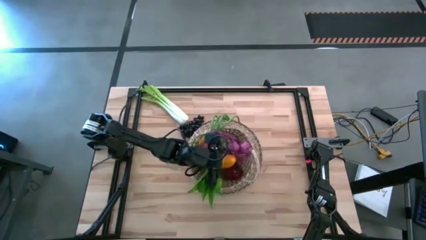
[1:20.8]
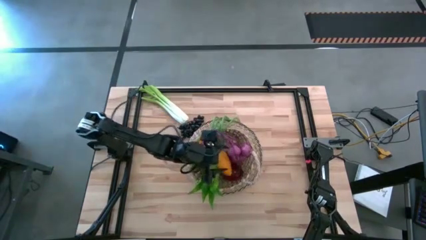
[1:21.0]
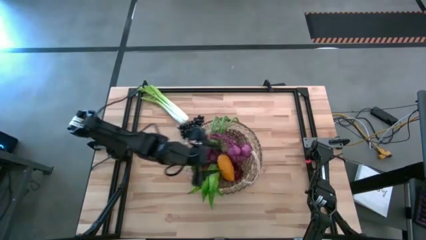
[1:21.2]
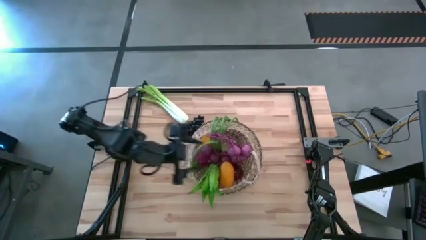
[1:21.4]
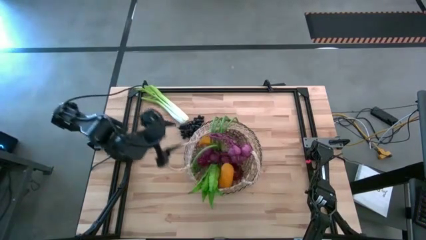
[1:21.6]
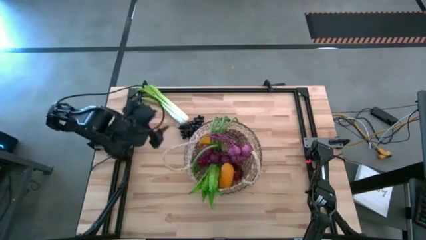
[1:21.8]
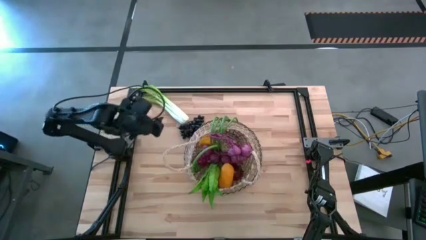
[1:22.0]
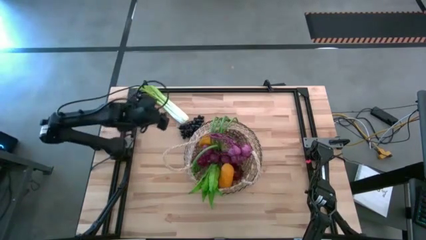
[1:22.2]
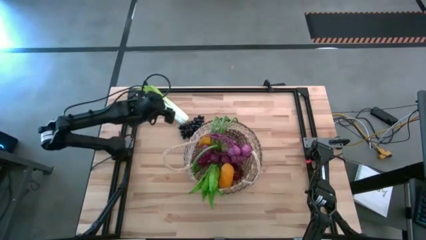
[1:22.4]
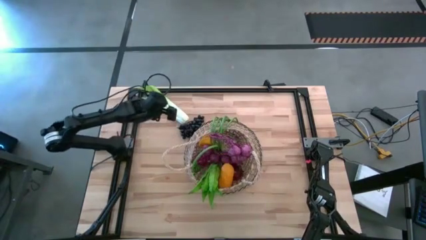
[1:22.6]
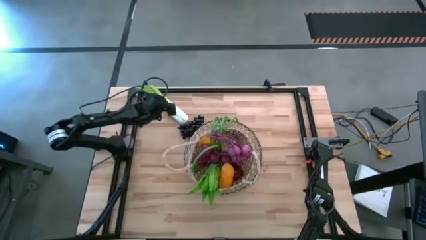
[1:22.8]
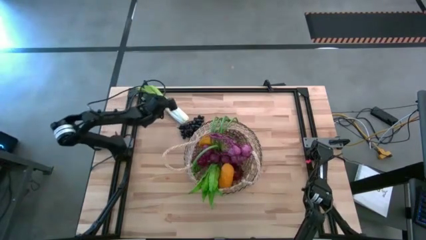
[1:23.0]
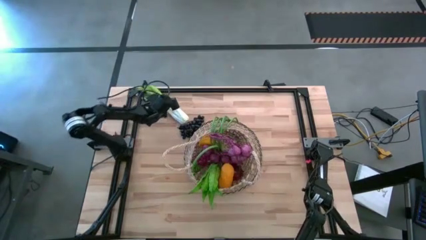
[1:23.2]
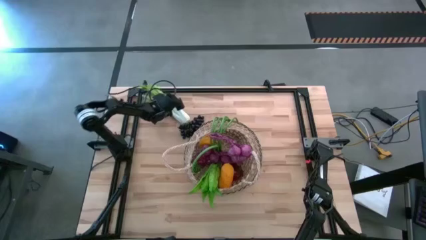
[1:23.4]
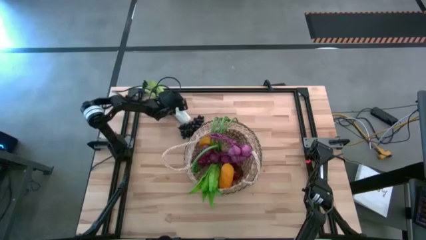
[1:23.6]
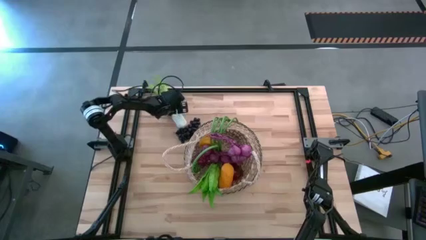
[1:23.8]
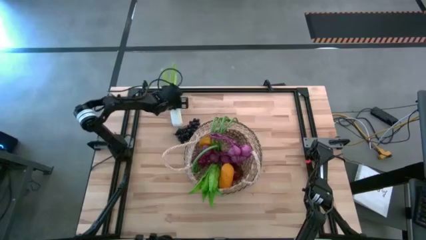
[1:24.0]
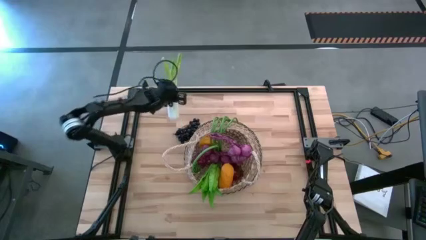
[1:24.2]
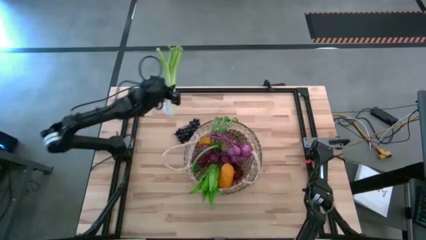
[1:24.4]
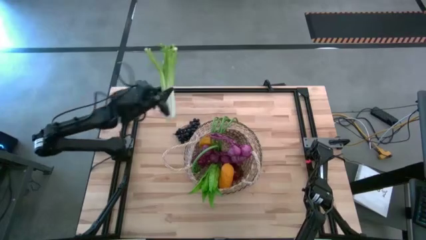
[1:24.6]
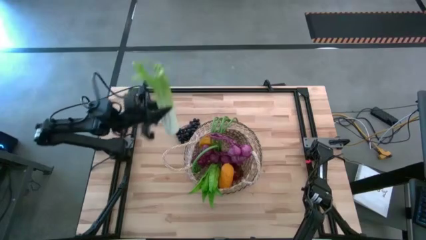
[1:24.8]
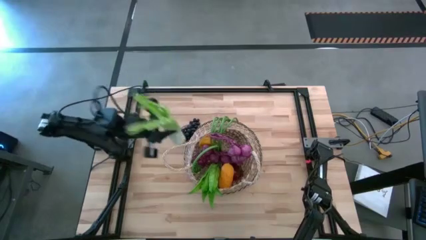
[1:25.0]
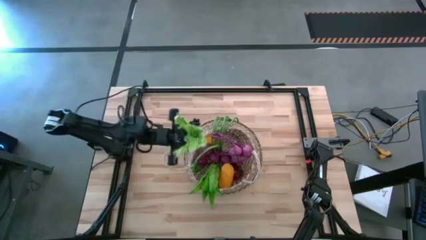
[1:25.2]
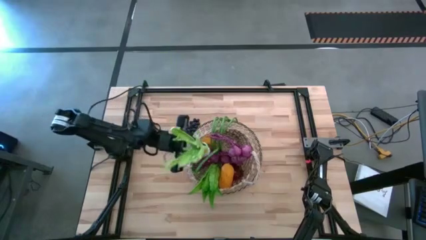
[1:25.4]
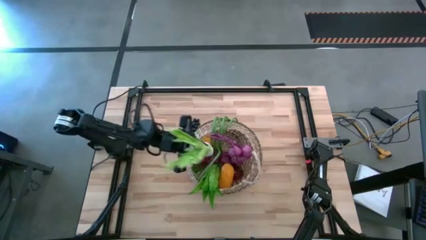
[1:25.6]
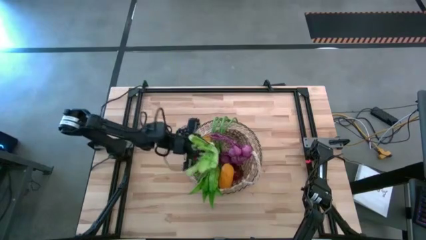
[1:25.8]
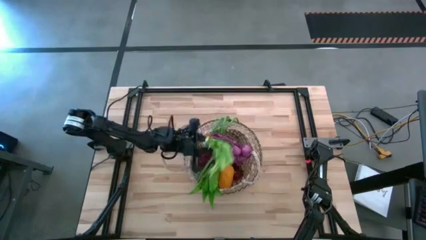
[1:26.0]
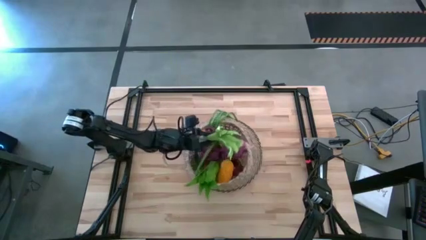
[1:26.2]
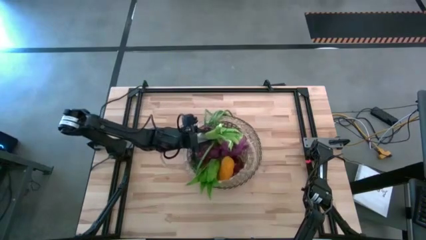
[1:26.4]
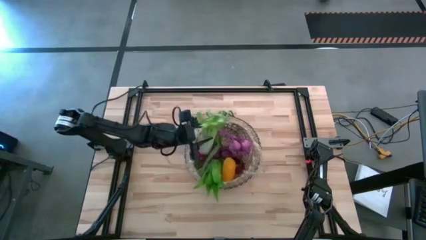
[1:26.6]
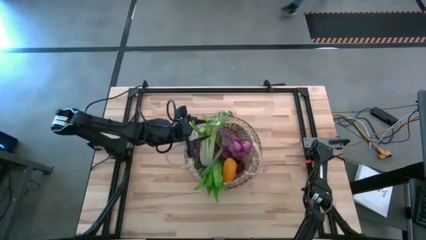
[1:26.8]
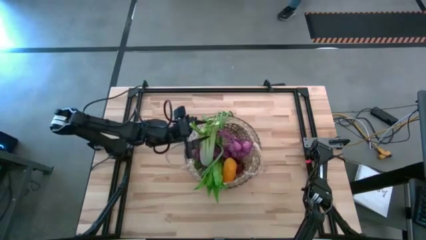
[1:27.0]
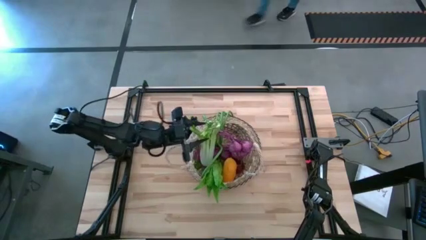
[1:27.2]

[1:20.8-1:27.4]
Task: Build produce basket
Put the celery into the basket

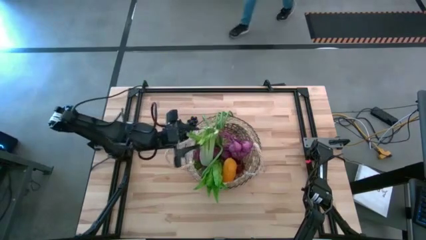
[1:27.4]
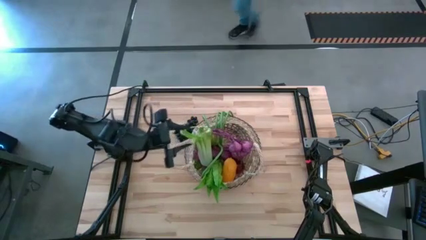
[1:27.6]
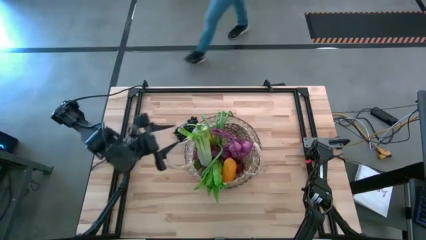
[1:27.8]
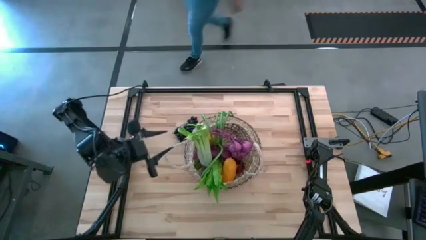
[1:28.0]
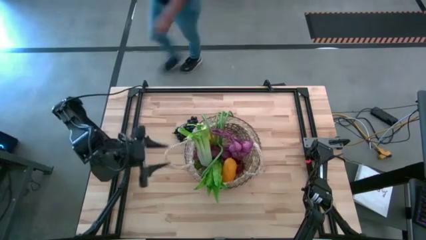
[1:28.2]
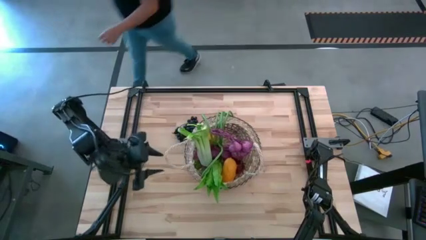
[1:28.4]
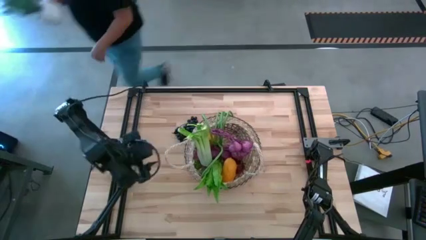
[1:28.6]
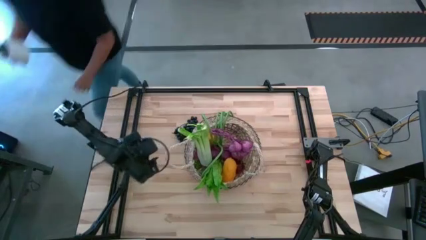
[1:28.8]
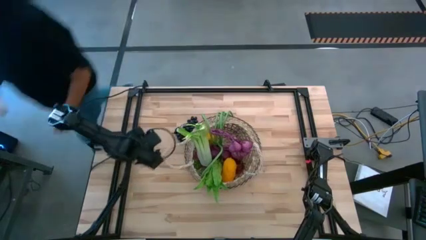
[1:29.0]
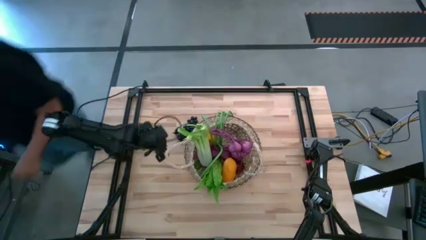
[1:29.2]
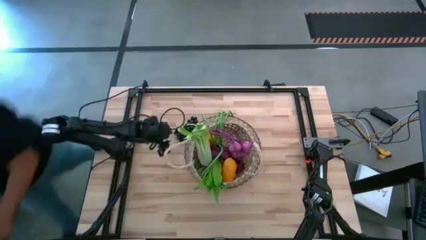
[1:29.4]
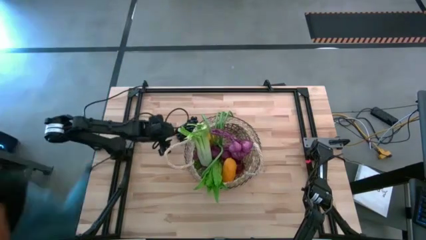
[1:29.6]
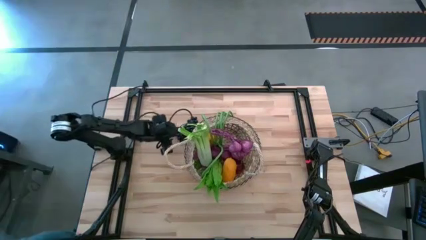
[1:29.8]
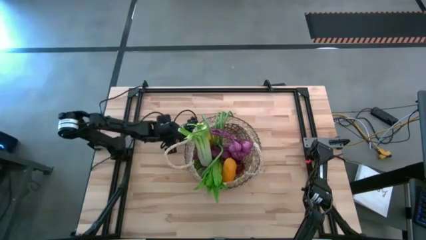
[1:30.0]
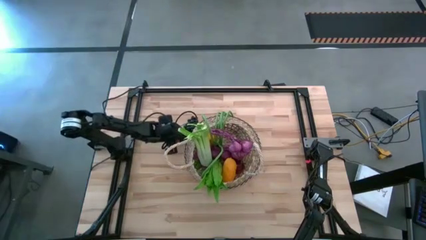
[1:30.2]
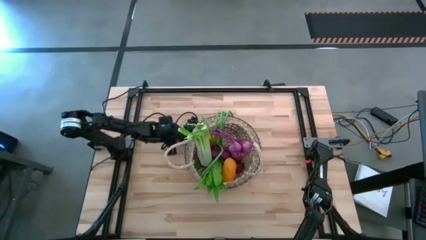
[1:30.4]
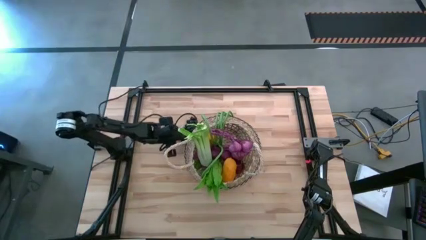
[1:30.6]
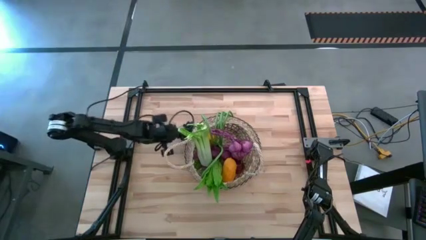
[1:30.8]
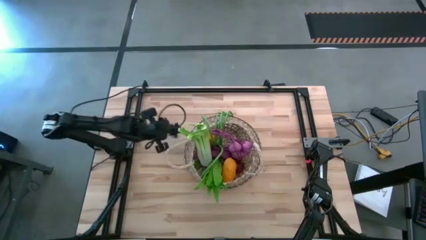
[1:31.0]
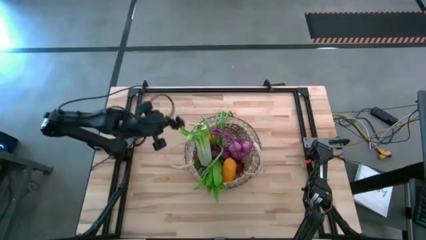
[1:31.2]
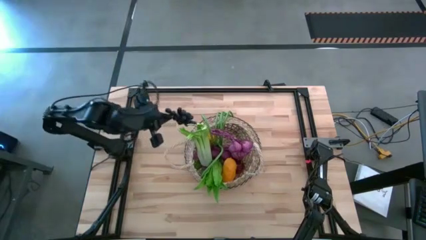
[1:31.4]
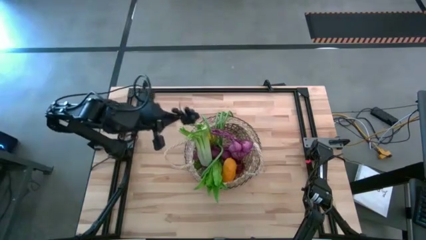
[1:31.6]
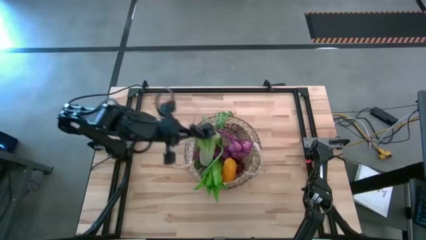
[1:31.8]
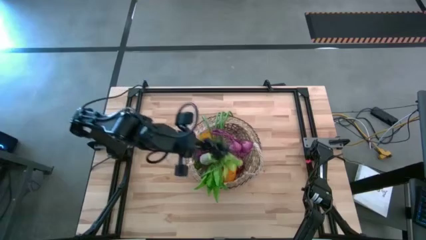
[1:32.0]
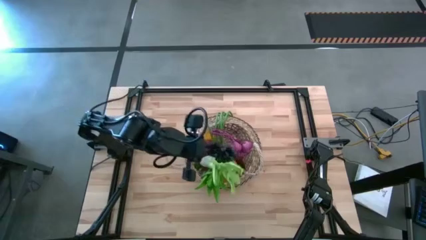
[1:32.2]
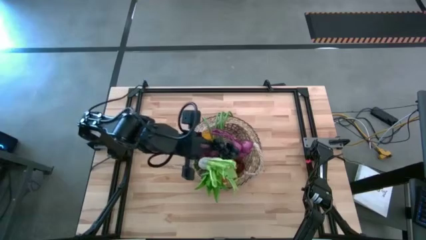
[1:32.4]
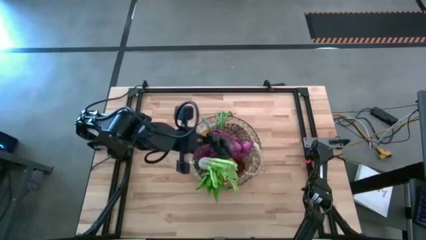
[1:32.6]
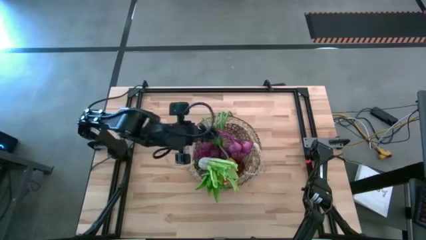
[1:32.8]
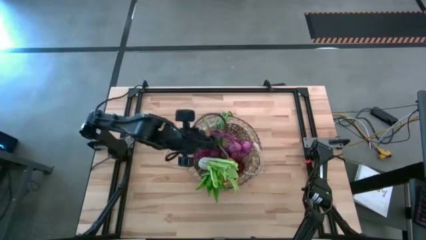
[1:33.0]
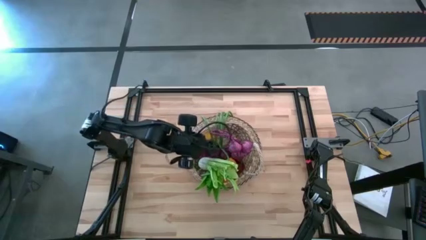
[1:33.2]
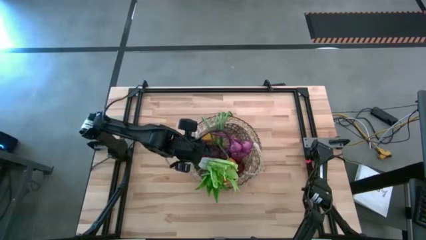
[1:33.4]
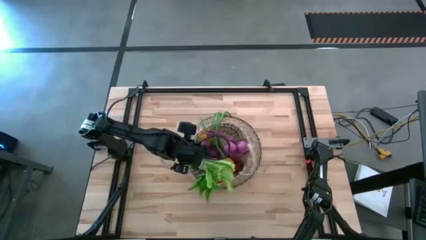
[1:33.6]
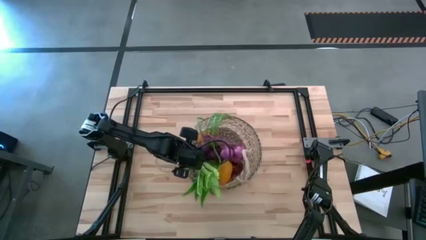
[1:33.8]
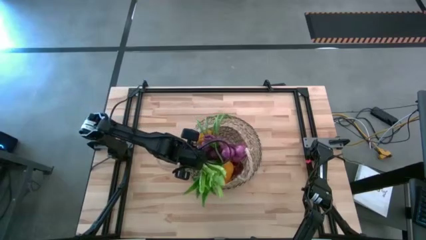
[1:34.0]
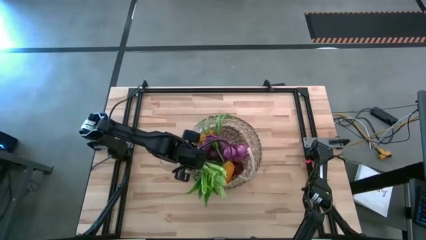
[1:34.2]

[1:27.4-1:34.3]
Put the grapes into the basket

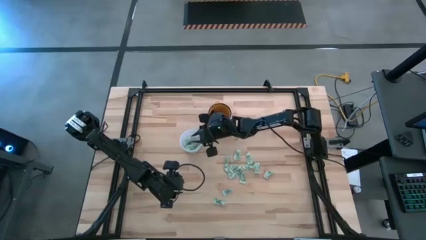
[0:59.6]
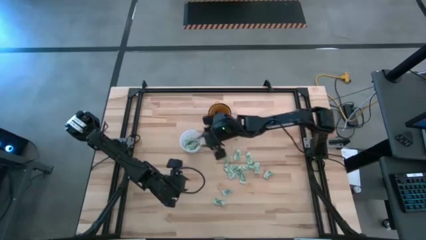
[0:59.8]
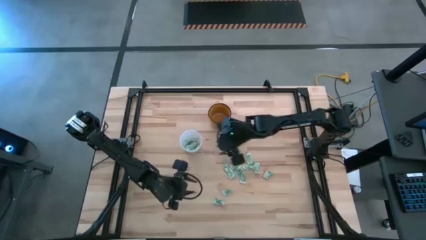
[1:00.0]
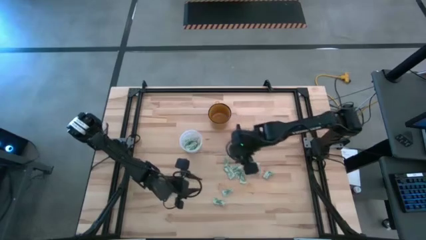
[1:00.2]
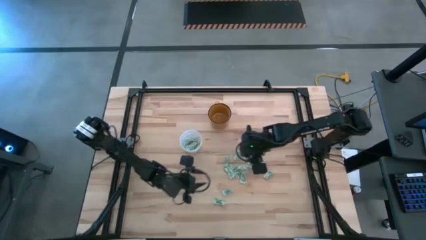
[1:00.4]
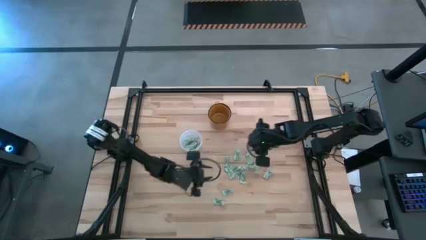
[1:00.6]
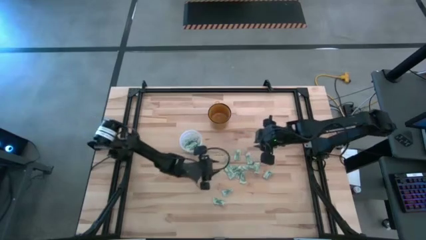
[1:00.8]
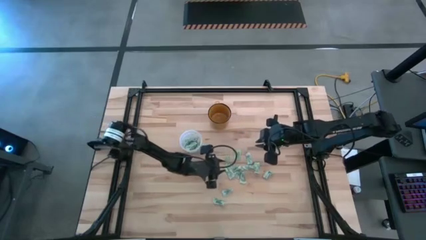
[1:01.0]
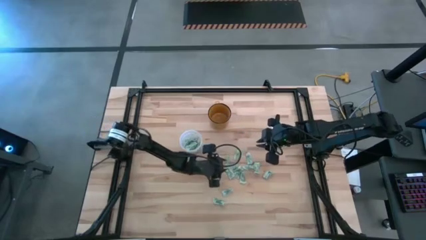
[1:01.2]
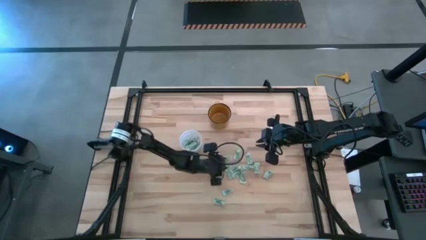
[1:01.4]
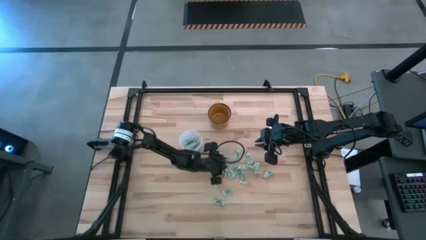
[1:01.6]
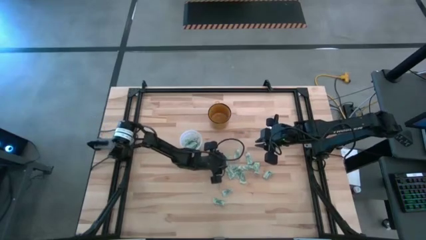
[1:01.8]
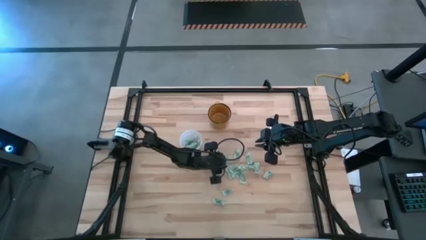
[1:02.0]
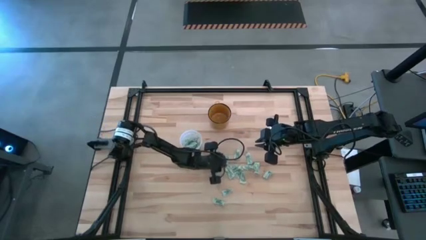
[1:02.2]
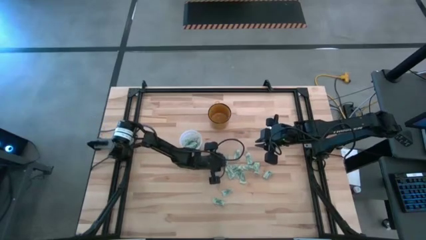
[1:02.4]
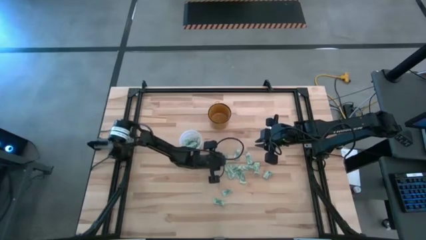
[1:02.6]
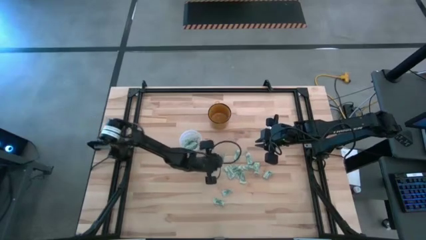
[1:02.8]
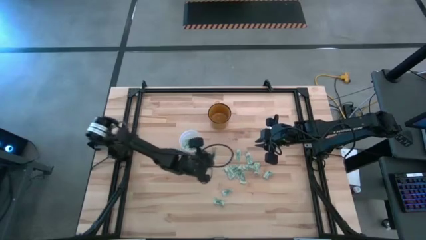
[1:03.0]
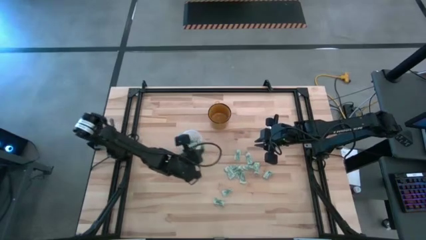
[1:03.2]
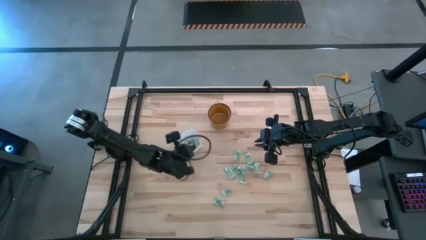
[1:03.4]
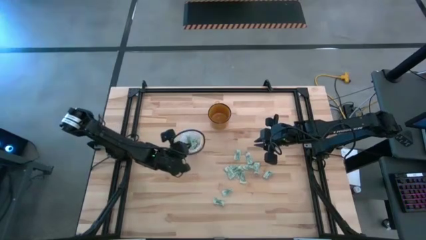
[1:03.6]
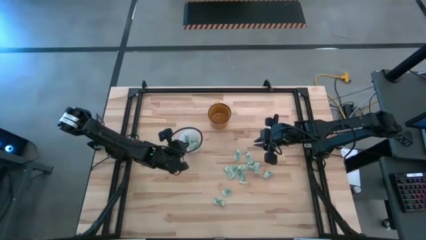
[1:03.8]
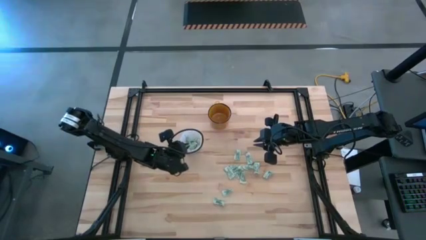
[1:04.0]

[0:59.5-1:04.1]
Task: Pick and place Stevia / Truvia into bins
Put the stevia packet into the transparent bin
